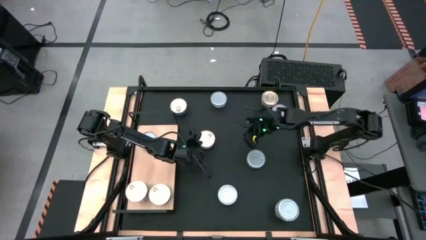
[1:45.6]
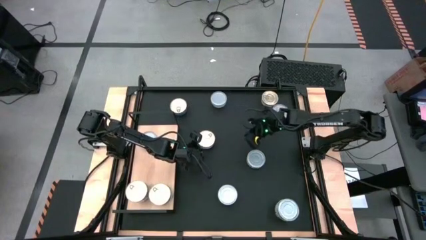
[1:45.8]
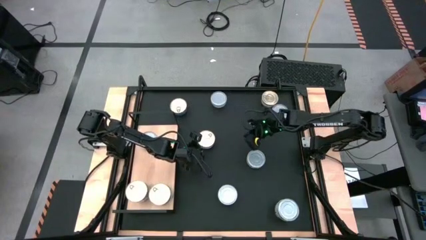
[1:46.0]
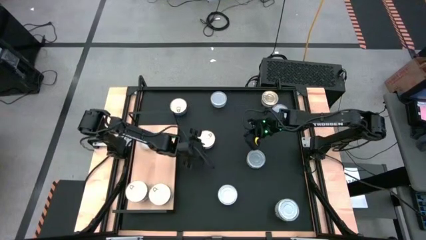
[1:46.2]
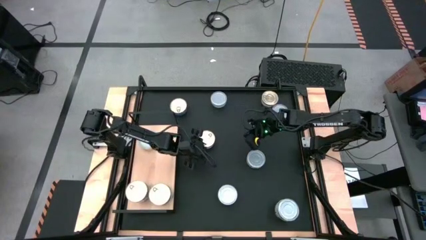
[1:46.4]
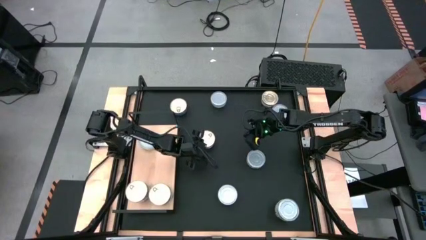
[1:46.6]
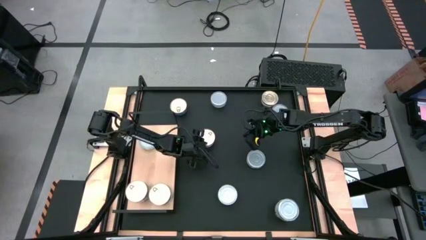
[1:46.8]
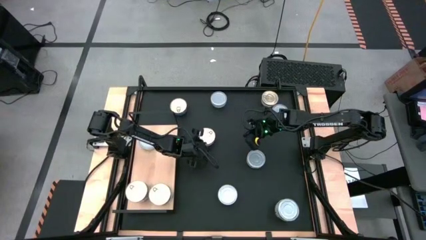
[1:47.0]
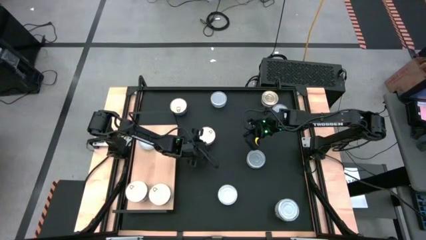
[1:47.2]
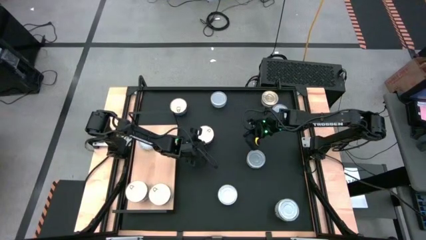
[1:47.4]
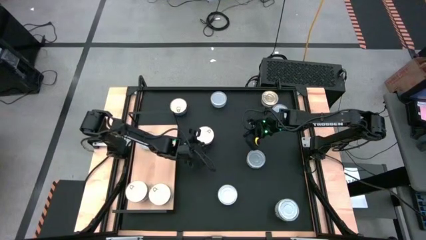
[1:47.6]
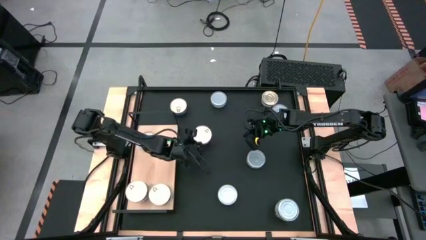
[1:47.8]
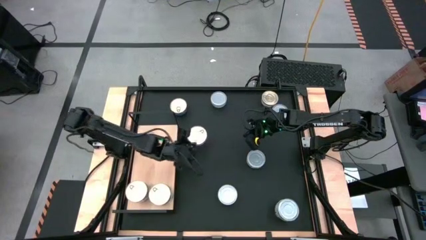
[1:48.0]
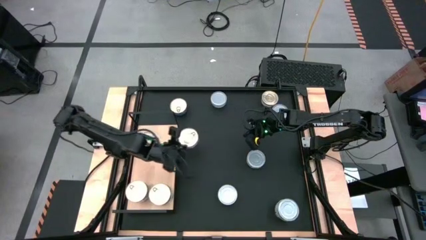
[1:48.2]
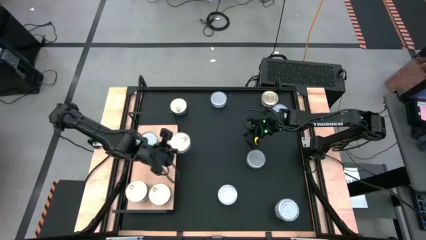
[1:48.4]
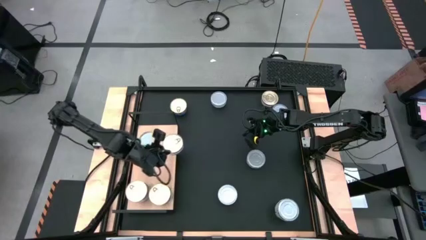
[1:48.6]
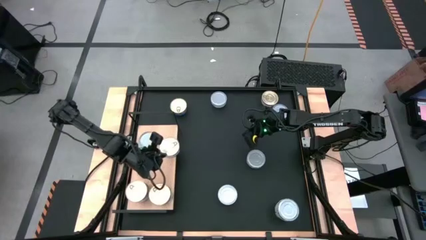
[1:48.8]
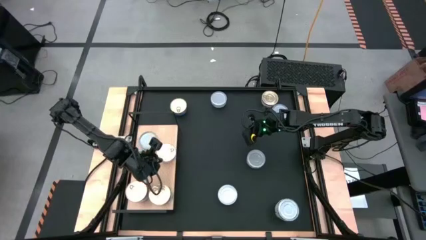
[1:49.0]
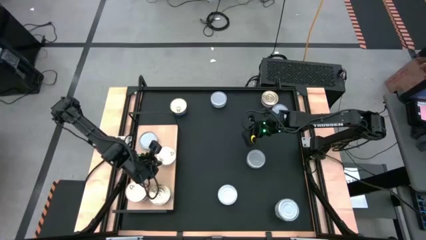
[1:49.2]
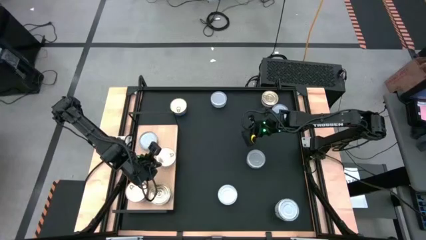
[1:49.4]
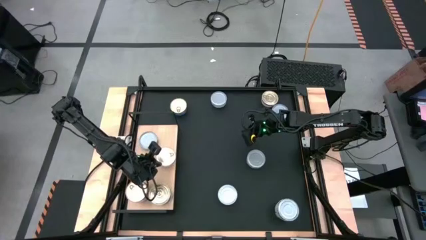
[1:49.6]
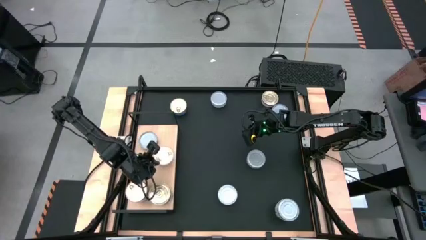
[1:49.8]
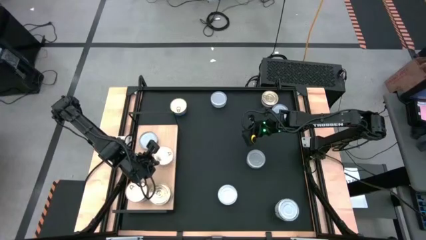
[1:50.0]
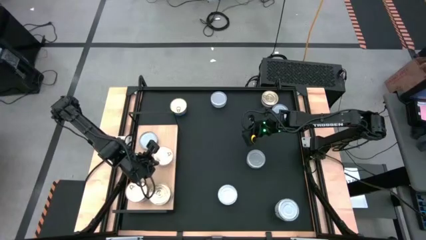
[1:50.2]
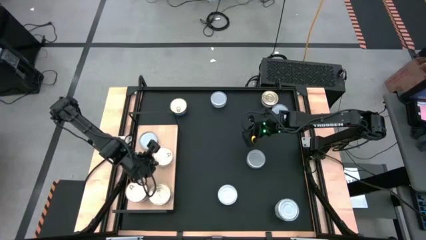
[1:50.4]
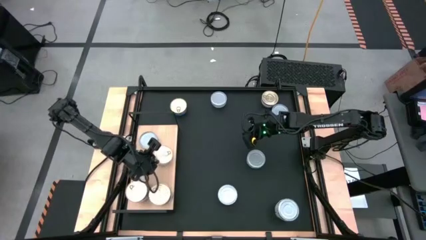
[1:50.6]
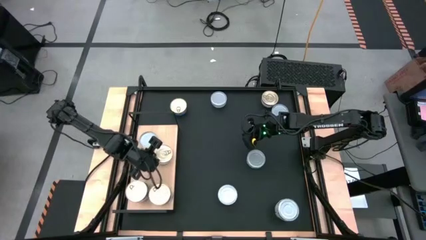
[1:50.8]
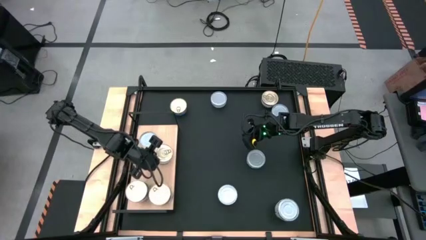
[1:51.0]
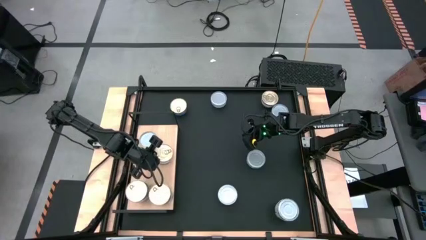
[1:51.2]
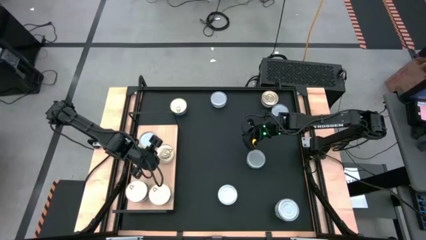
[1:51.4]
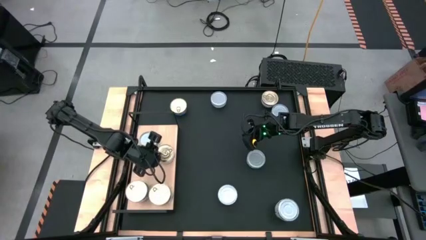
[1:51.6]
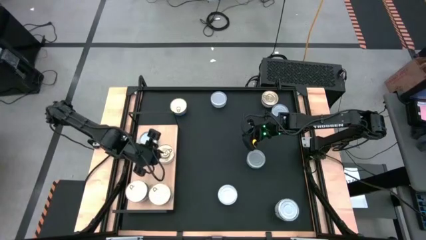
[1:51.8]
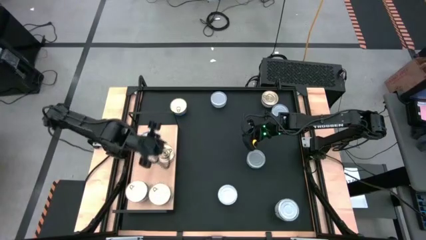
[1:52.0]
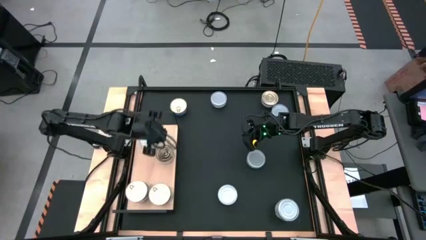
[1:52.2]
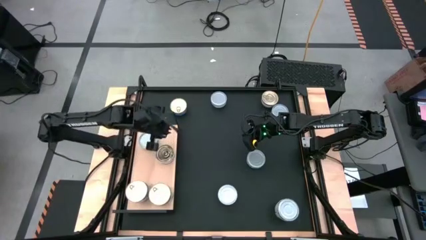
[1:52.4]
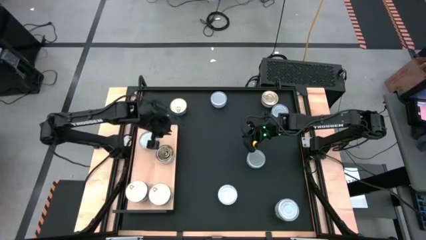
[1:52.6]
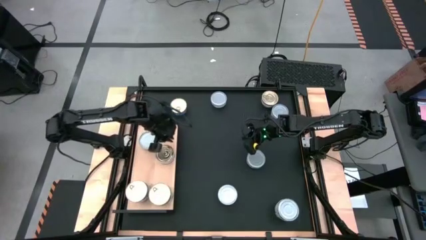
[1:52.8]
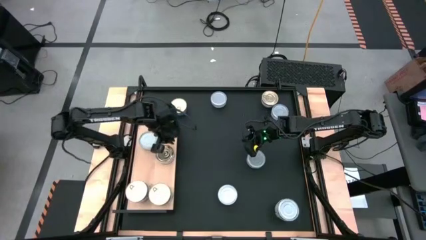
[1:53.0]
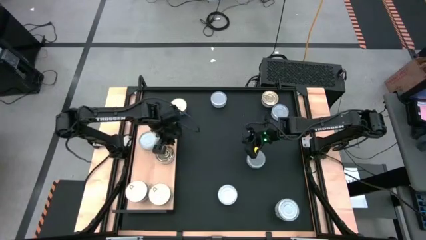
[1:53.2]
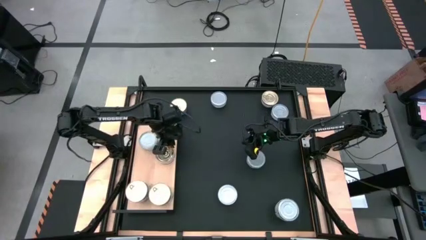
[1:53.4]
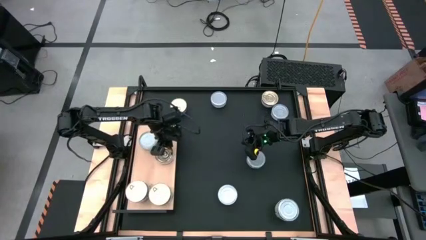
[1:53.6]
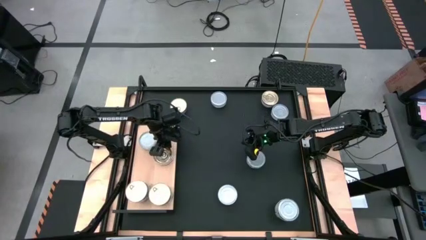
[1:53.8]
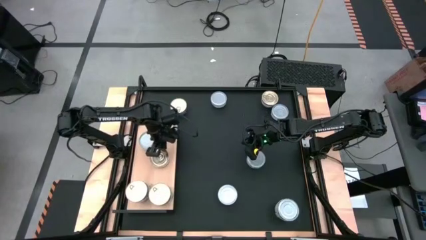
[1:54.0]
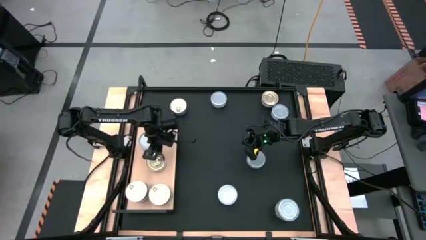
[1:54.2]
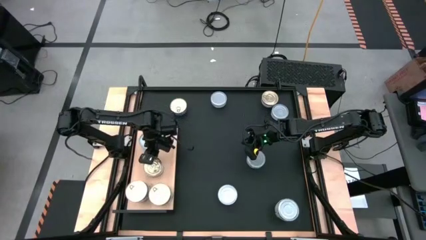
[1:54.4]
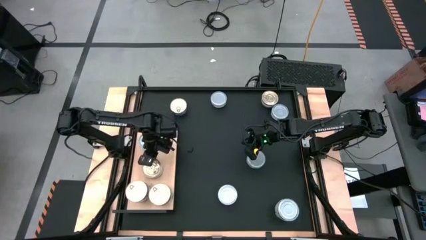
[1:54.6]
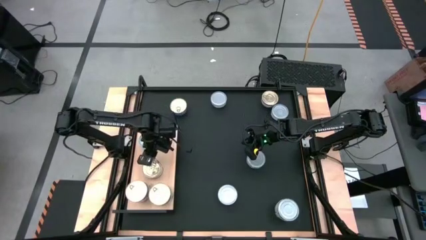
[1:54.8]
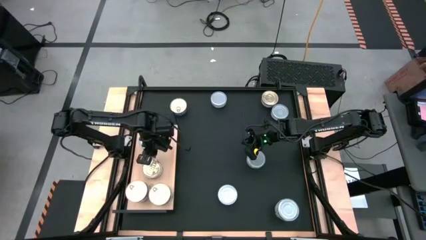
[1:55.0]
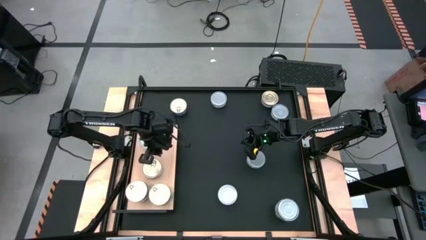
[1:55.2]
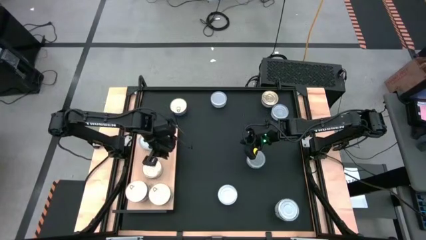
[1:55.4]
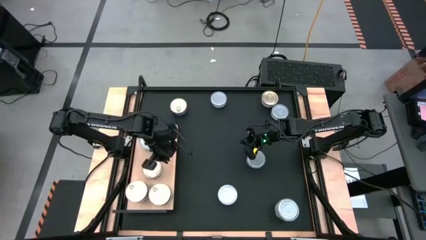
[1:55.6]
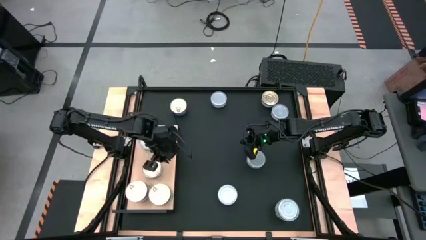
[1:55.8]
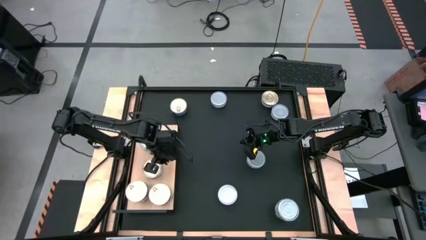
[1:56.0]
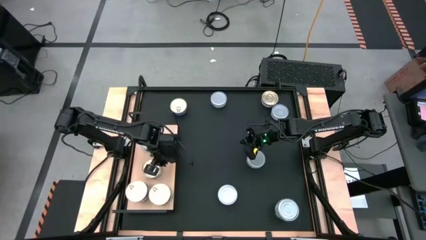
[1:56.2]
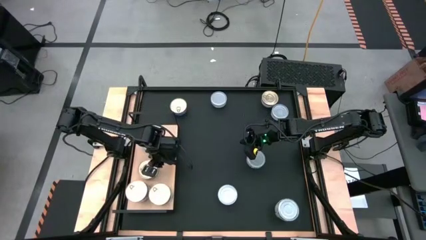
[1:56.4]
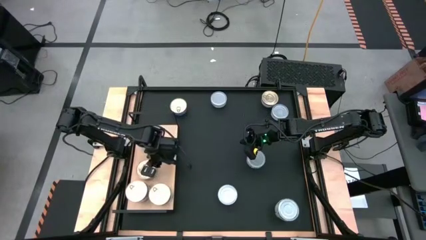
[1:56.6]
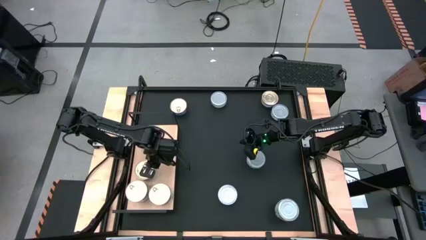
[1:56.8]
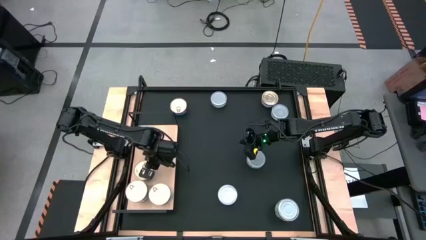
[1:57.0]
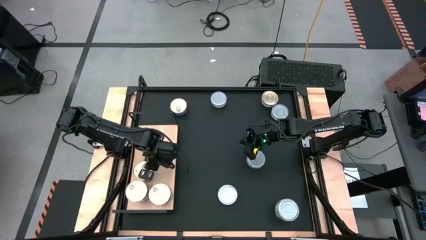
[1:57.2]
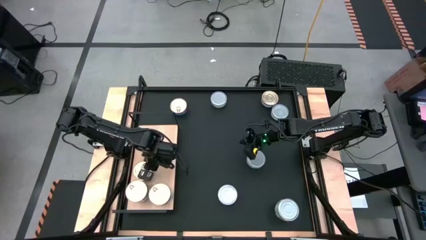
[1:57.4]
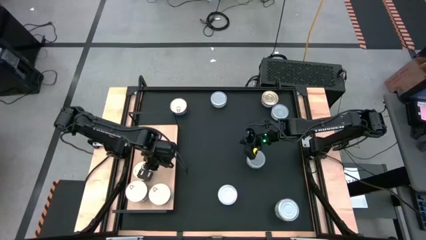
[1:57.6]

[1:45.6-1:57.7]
Task: Stack canned seafood by type on shelf
Put the blue tuna can aligned with the other blue tuna can on the shelf

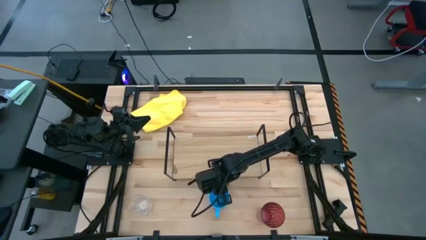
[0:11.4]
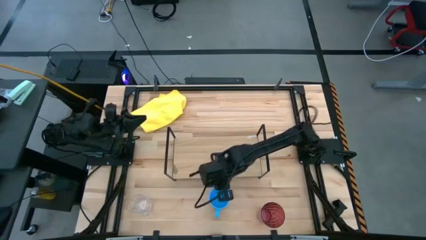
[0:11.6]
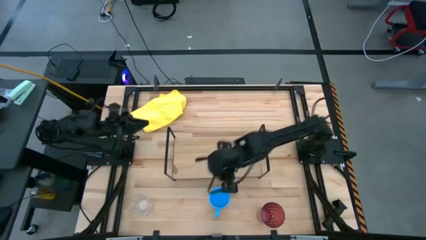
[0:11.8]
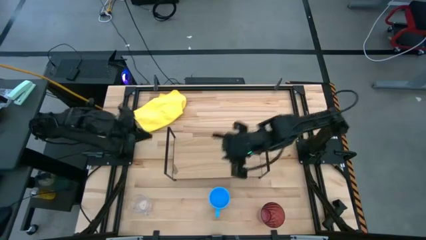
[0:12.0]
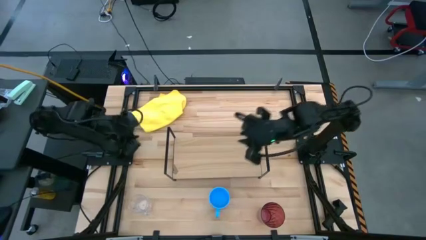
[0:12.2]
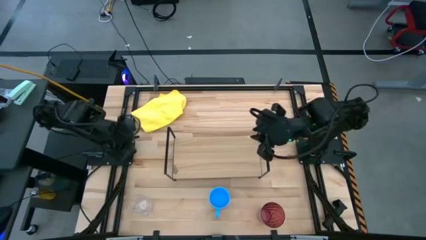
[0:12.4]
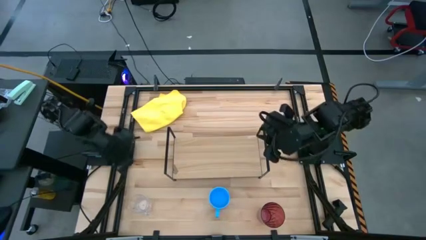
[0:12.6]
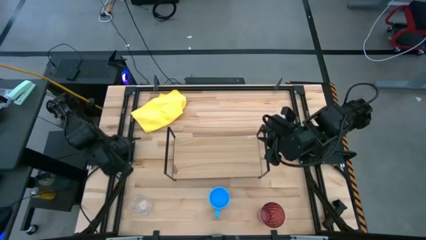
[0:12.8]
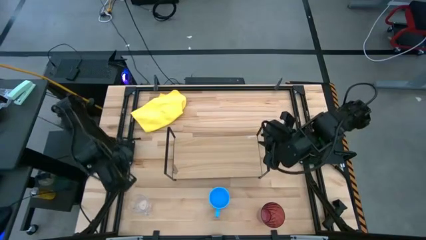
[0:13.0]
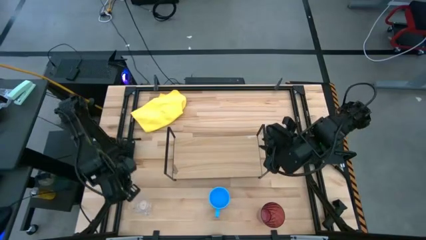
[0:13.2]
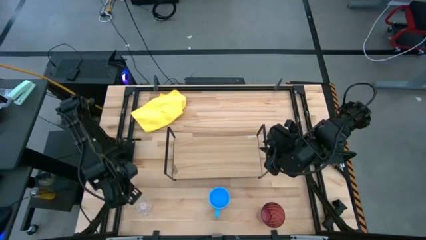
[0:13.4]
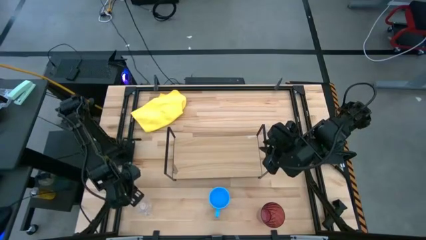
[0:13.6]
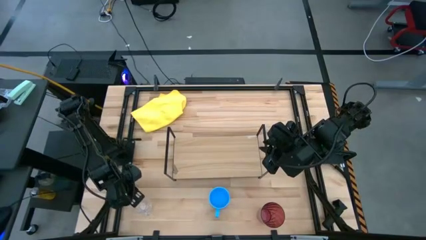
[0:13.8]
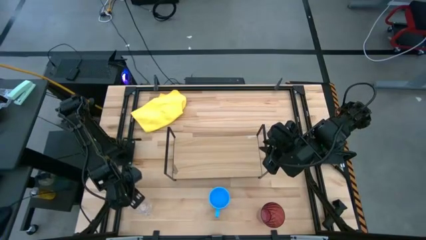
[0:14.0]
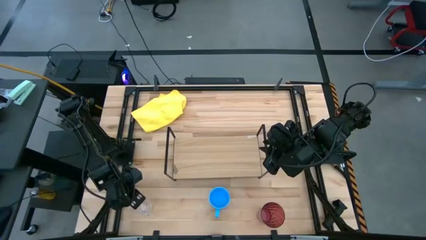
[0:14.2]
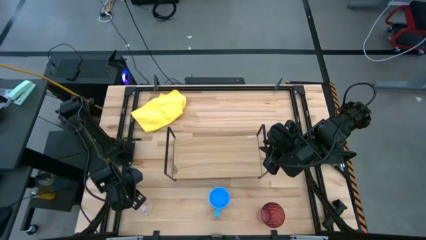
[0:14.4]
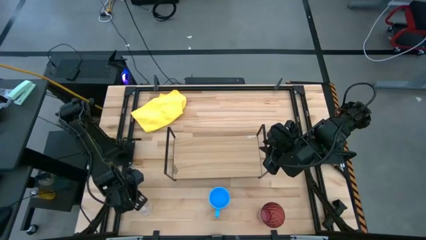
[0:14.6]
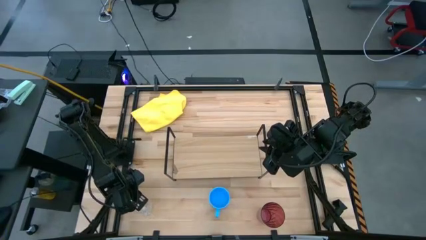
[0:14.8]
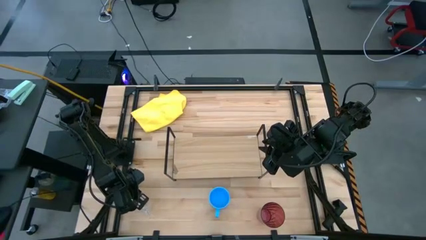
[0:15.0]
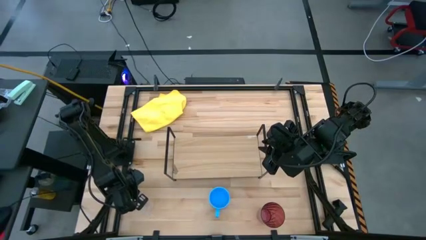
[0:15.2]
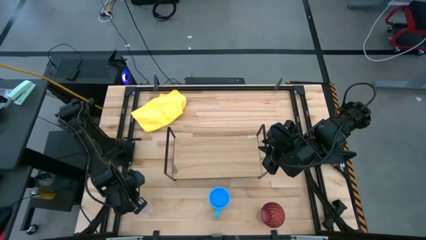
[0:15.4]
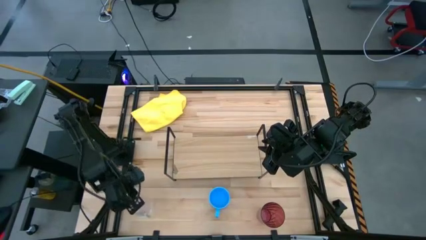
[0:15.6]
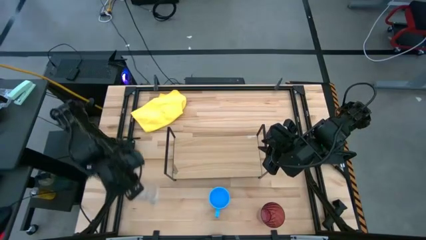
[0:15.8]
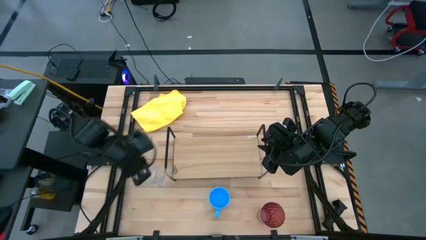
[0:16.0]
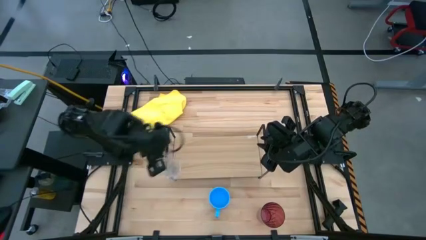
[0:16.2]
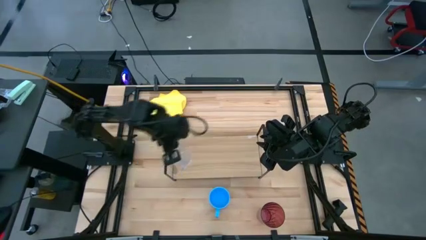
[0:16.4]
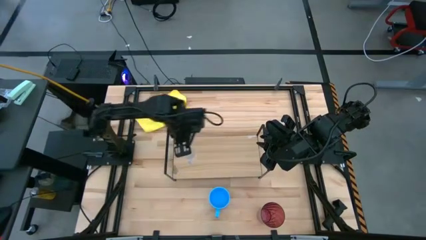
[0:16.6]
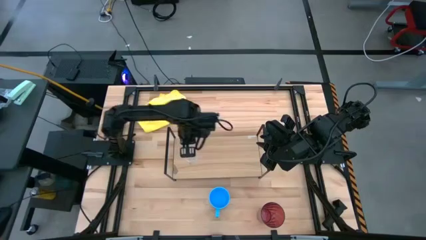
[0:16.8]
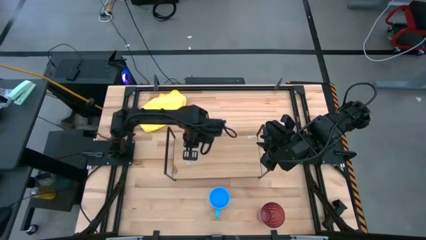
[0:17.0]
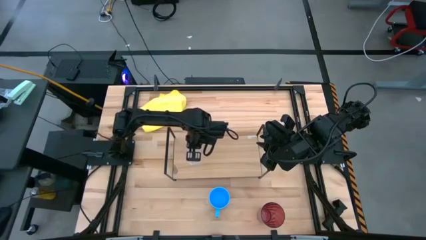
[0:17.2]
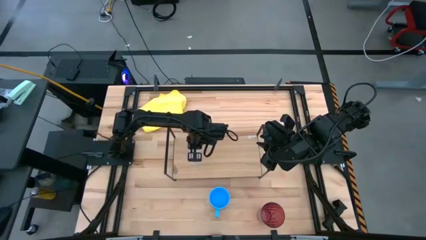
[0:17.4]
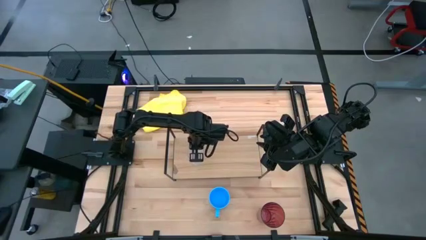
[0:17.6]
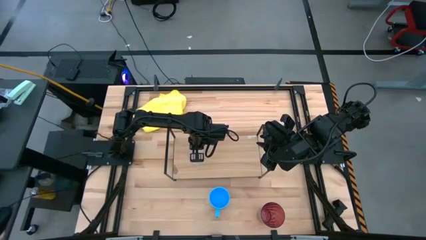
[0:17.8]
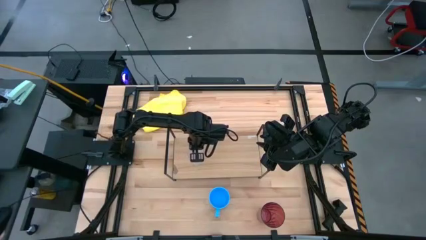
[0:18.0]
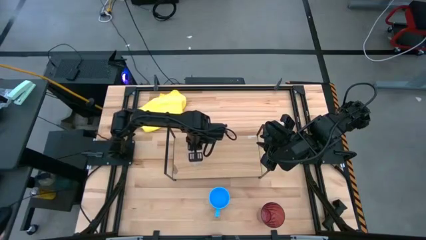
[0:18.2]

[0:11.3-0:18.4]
Task: Stack small to large cups/mugs on shelf
Put the transparent mug on the shelf
